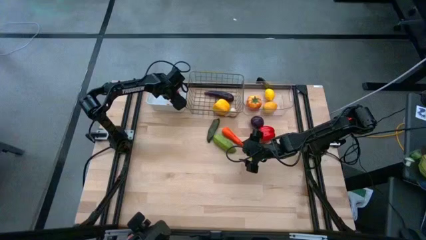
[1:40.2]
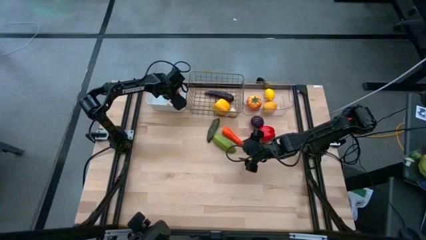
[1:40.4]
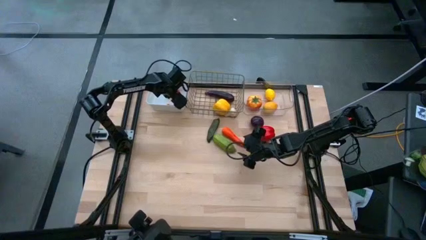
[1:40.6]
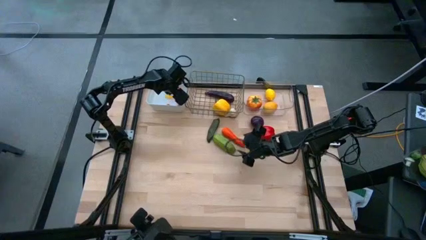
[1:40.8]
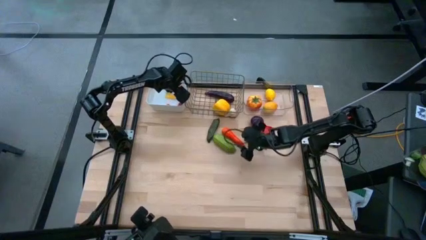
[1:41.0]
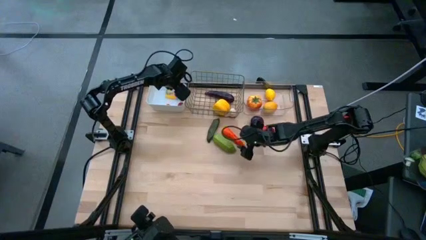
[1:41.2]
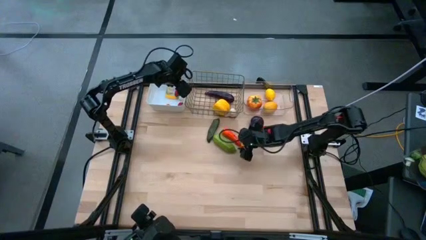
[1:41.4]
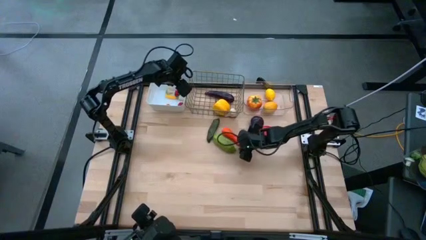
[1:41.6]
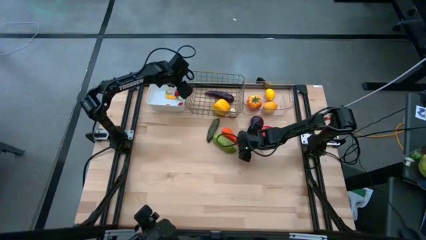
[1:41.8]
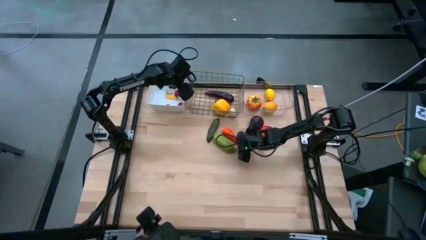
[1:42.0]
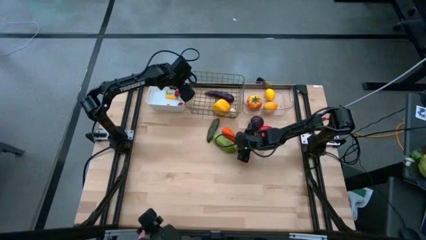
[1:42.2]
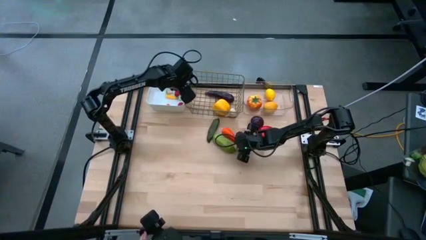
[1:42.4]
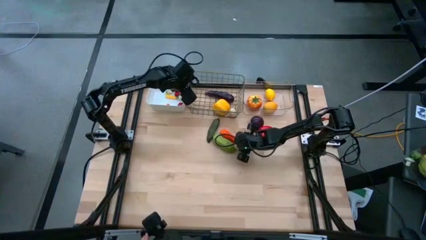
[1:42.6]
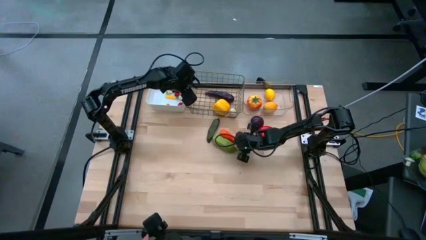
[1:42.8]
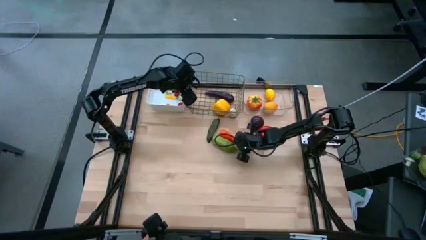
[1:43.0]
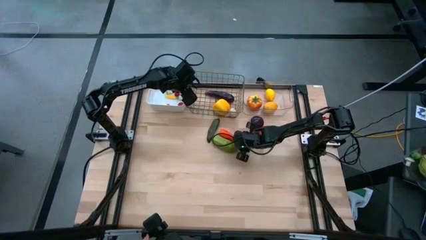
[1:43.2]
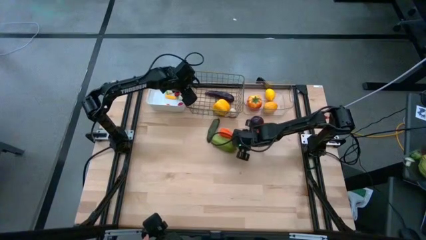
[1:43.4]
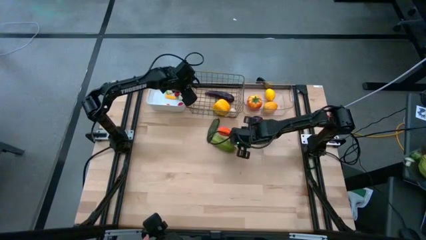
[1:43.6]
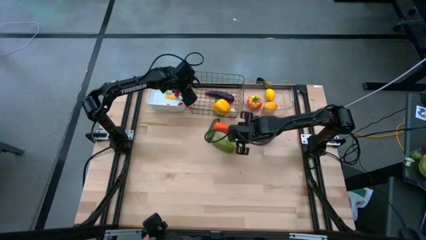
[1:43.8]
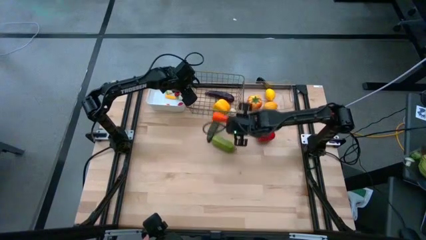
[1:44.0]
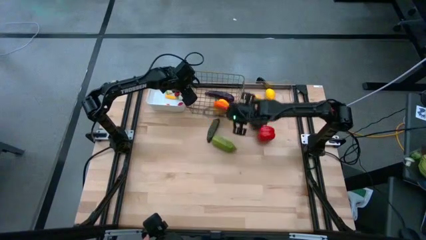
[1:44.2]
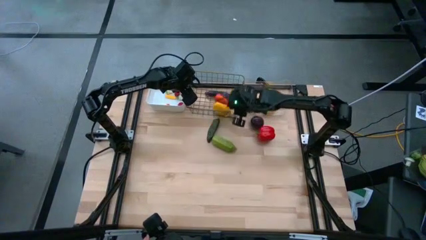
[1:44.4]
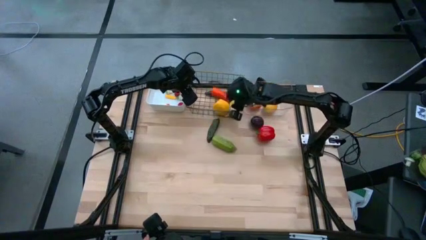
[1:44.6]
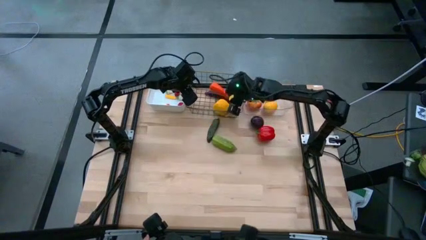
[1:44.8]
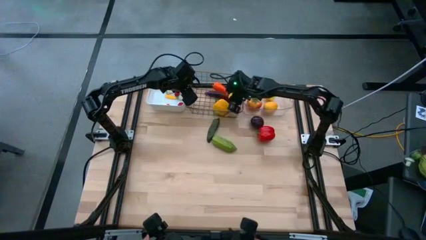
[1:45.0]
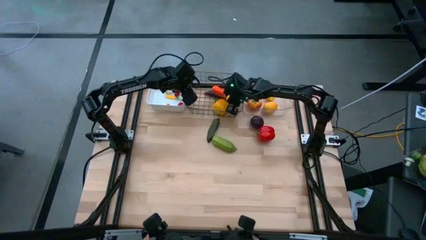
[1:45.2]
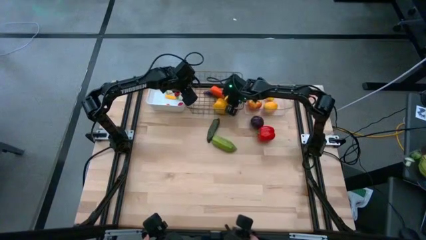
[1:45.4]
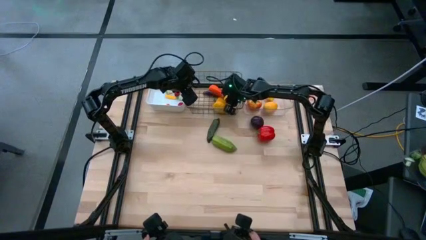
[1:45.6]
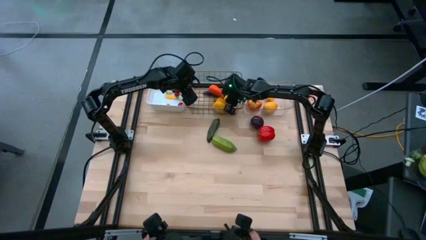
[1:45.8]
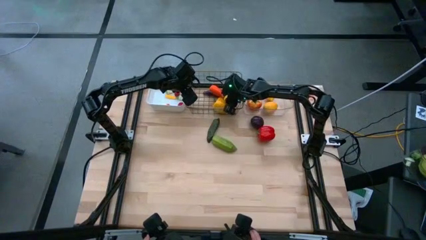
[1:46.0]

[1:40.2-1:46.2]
Task: Sort produce into baskets
Put the carrot into the wire basket

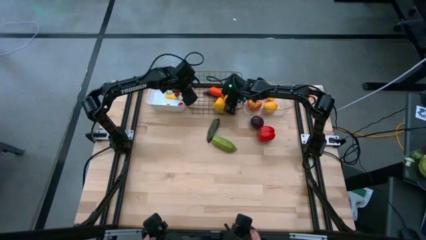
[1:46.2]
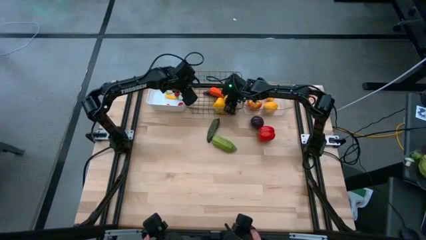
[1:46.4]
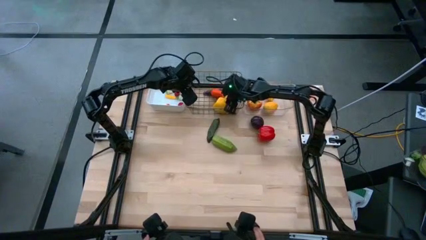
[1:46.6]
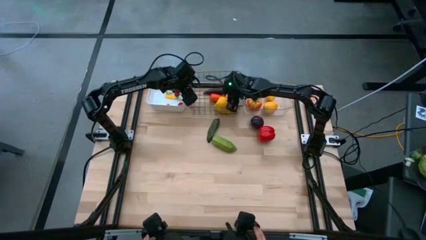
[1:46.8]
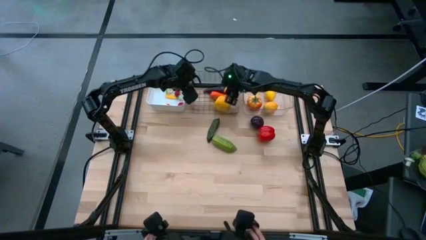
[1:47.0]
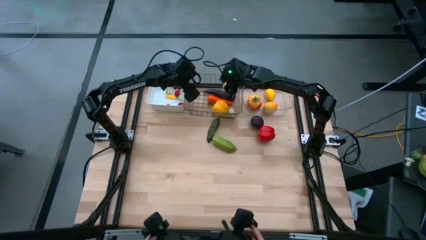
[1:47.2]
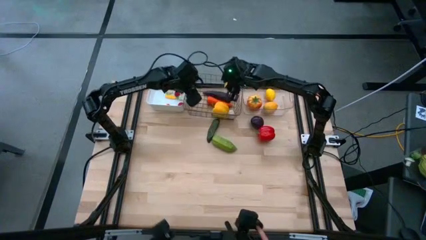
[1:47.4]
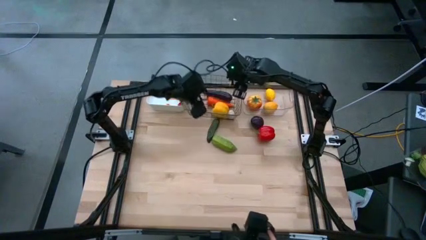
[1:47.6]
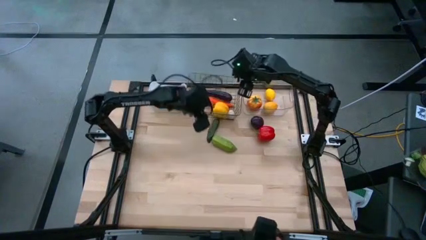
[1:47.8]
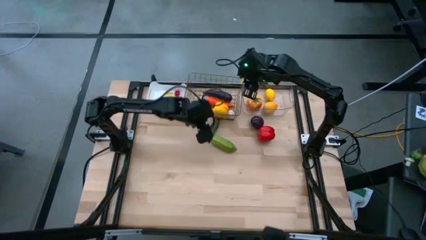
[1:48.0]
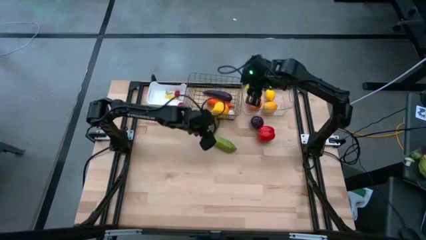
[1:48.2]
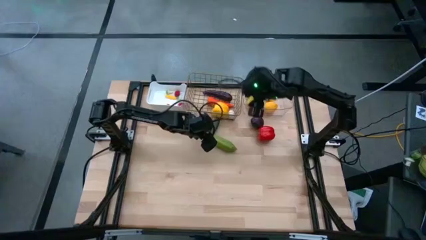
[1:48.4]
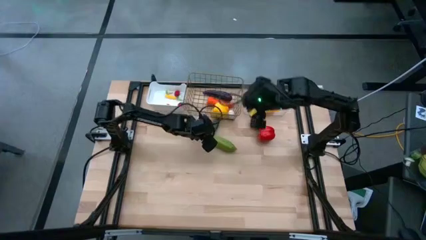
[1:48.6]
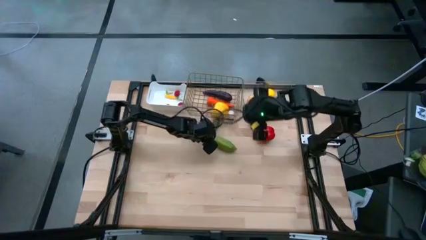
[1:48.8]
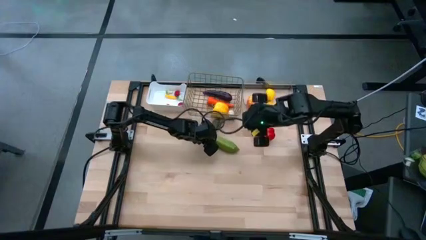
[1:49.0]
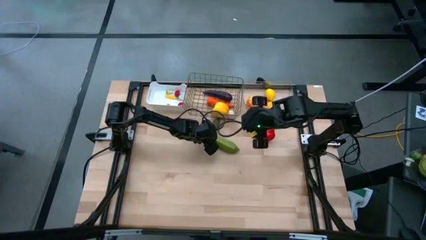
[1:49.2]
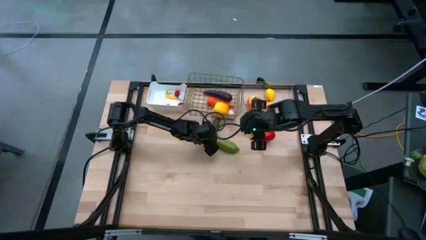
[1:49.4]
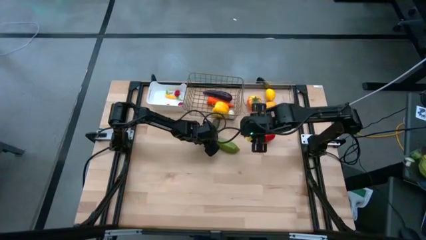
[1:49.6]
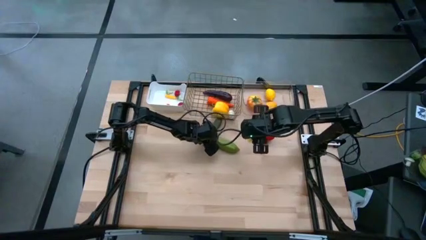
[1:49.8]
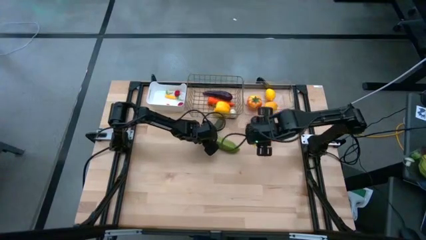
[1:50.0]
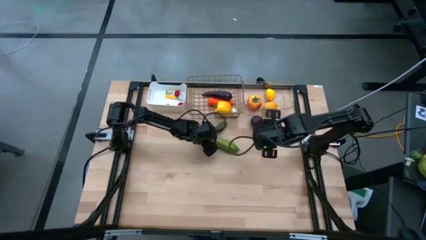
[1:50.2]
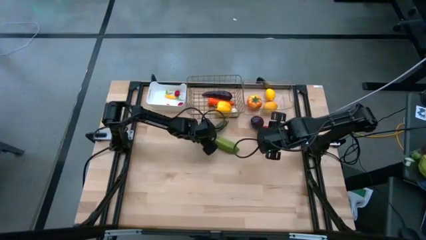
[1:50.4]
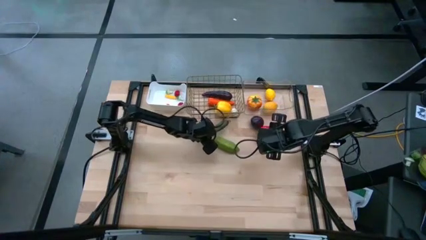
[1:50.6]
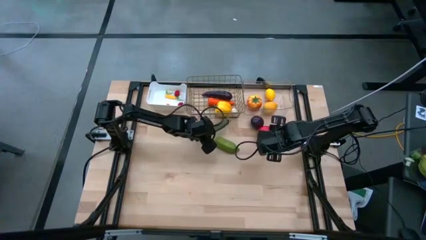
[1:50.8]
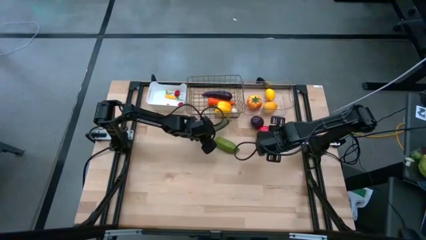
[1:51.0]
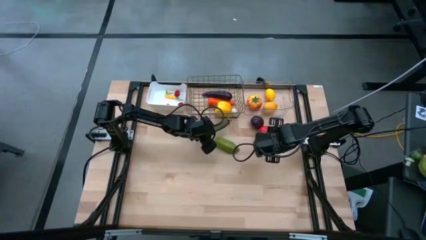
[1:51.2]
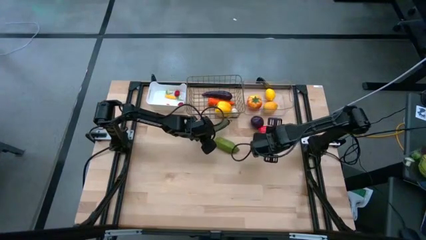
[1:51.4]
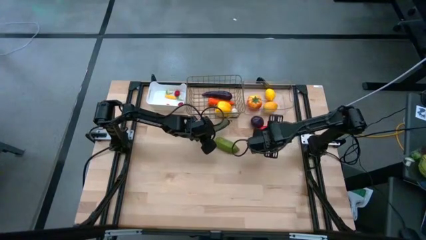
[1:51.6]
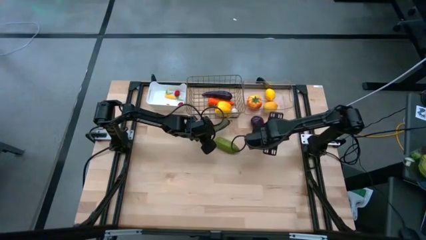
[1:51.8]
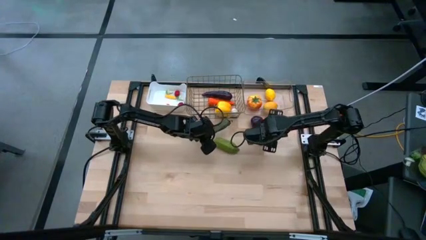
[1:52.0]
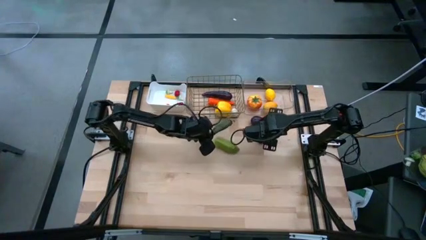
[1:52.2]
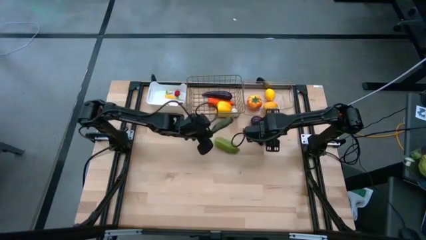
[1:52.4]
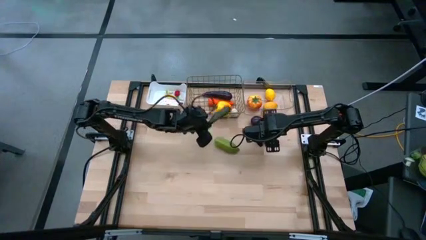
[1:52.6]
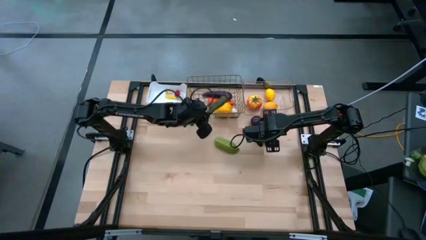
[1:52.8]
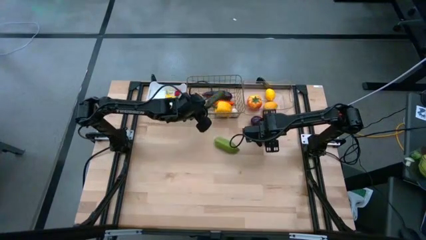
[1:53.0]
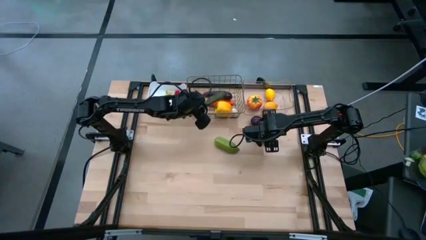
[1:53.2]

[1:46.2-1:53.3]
Put the green chili pepper into the wire basket
